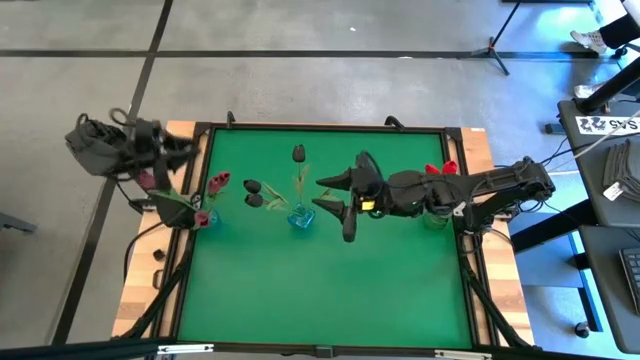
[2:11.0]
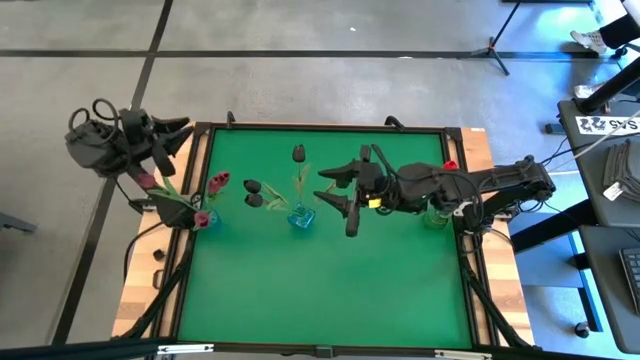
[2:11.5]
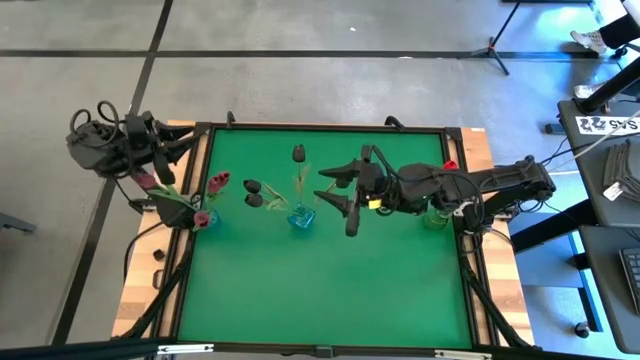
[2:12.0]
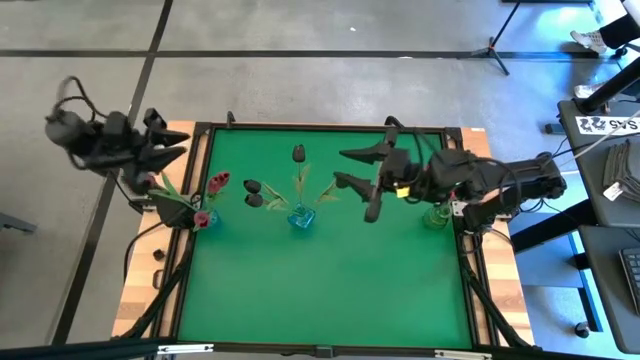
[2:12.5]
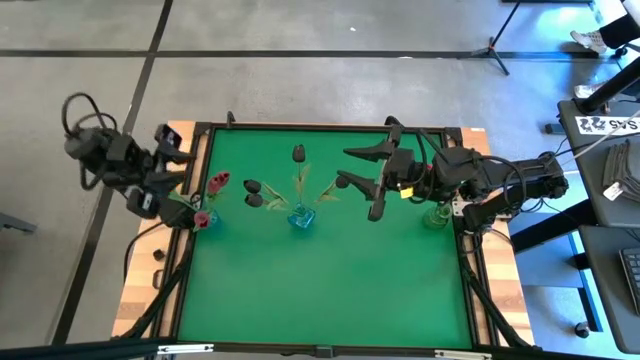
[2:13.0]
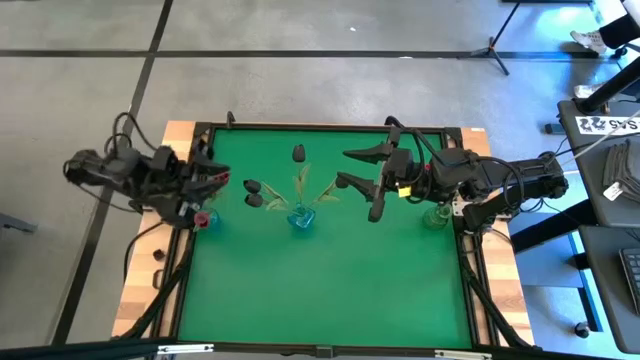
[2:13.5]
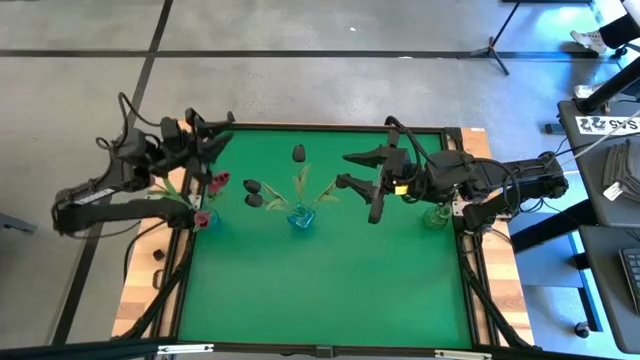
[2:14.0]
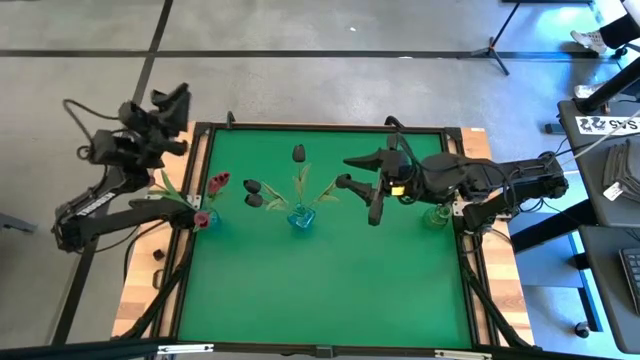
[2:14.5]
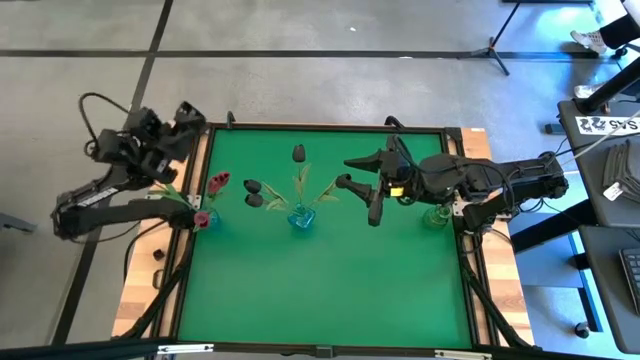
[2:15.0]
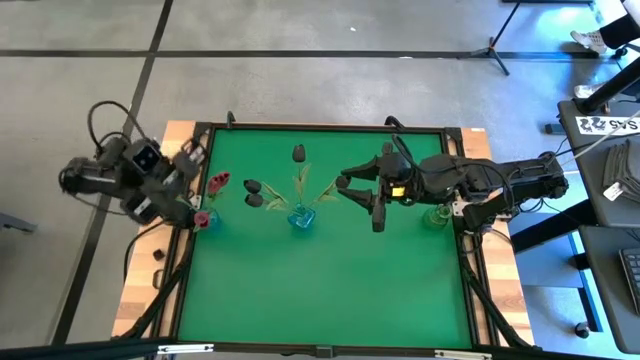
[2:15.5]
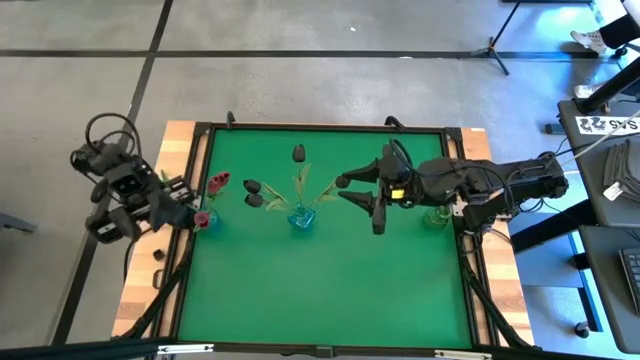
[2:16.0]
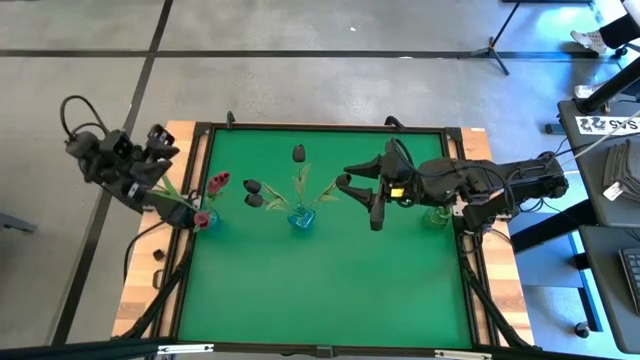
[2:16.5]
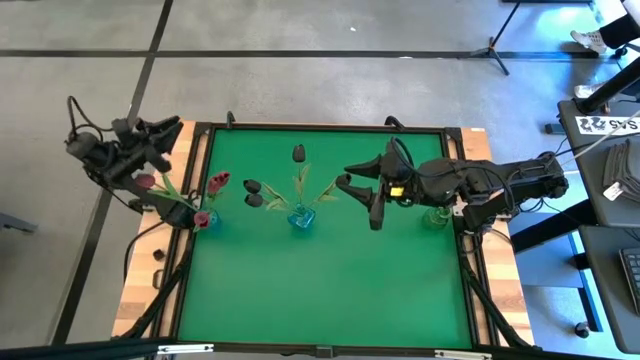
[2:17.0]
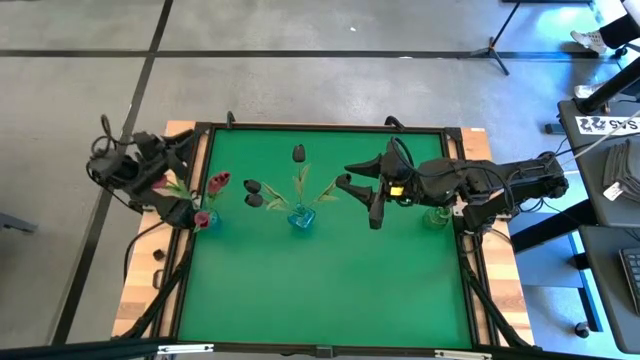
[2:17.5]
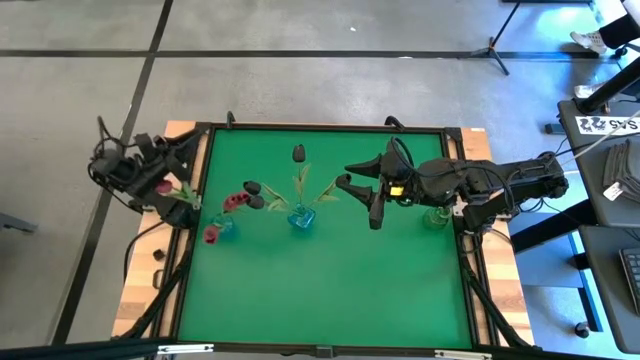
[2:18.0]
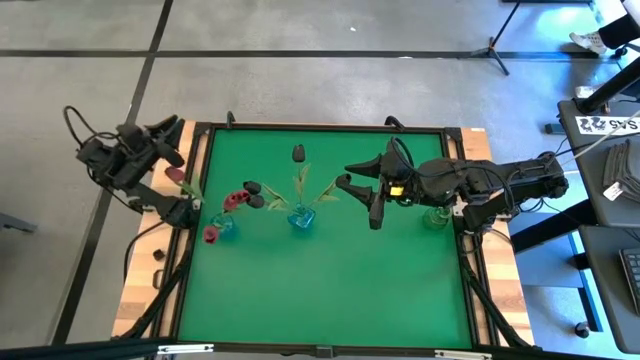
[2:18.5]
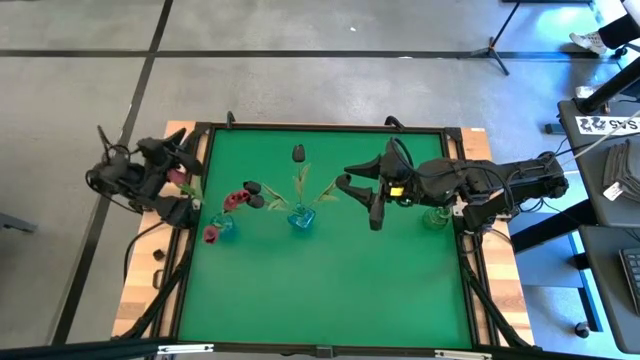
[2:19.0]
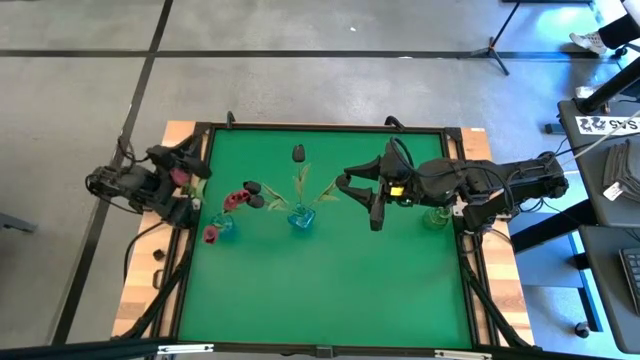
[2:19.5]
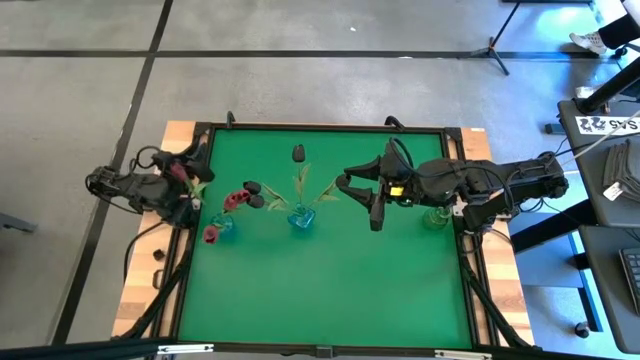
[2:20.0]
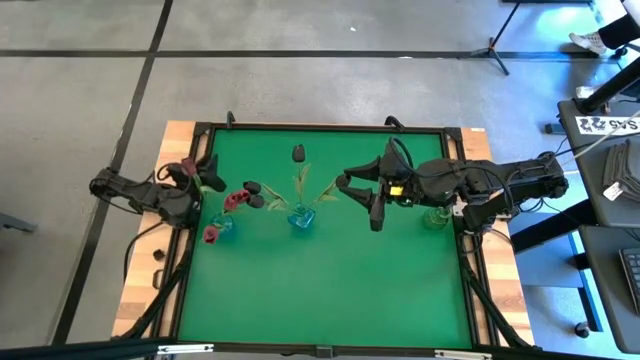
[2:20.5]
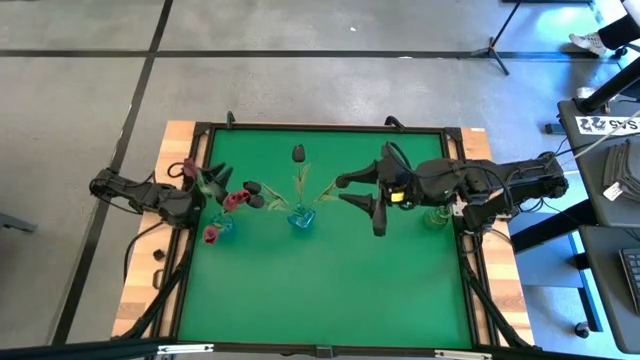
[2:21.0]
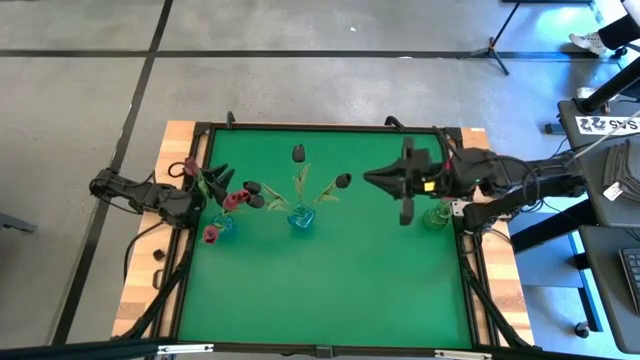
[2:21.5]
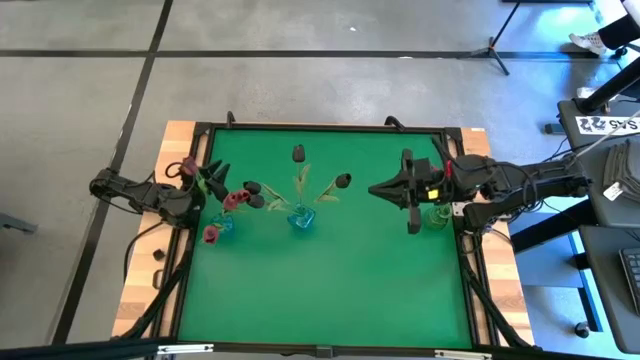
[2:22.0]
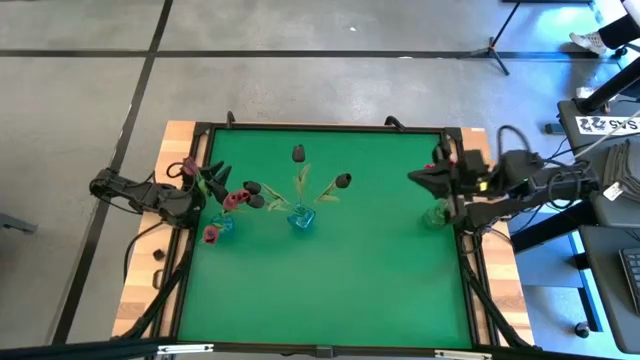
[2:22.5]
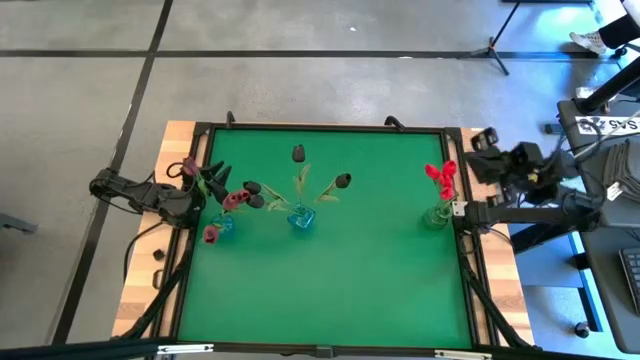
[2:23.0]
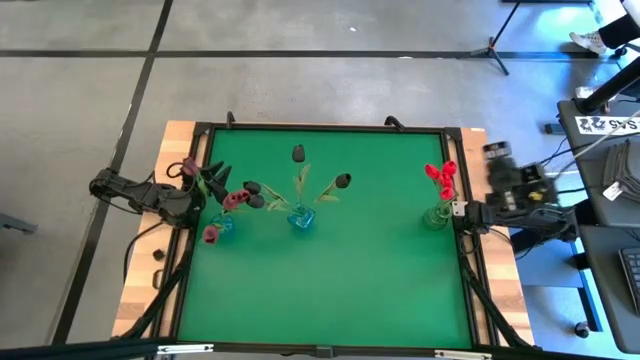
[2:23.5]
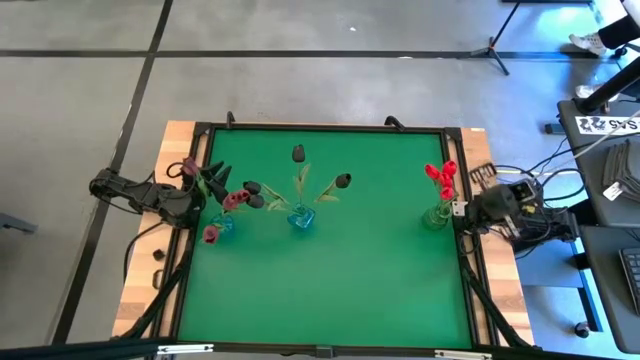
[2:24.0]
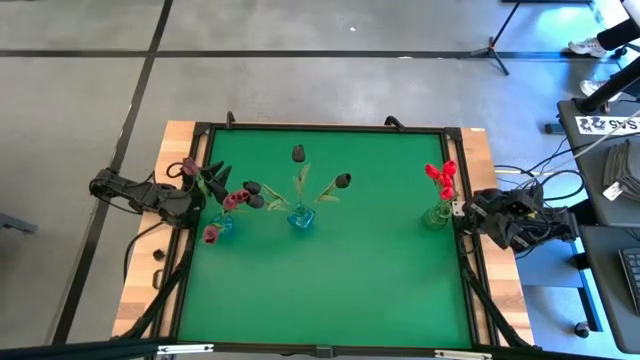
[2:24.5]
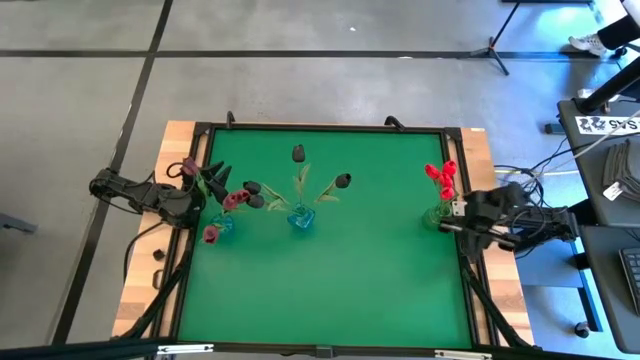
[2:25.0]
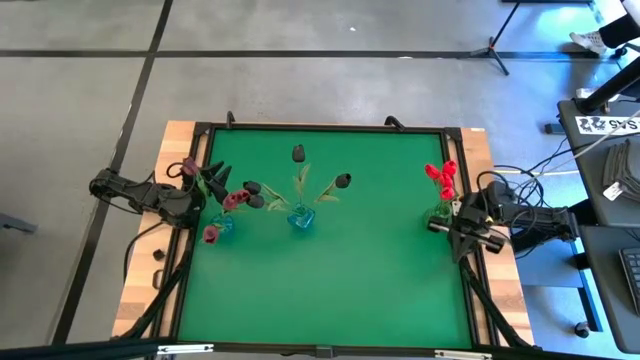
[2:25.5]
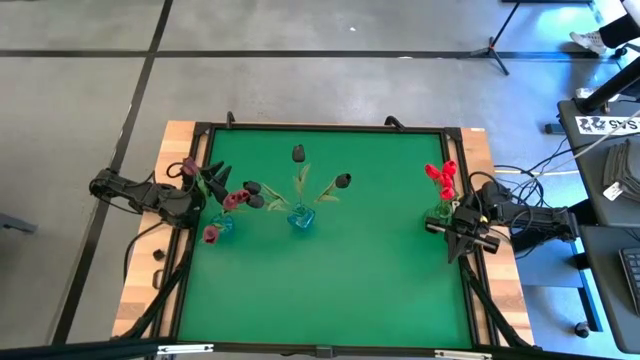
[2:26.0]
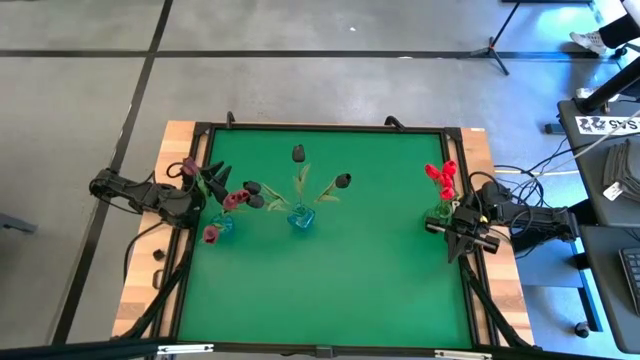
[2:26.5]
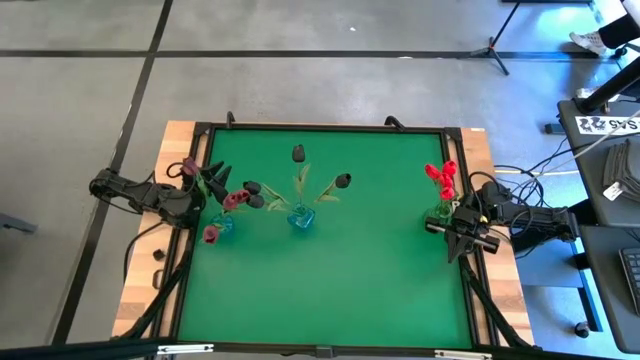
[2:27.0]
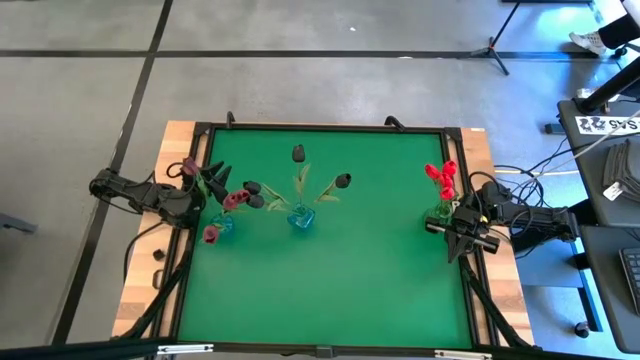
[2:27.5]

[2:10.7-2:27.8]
Task: Sort flowers into vase by color
Return to Home Position
